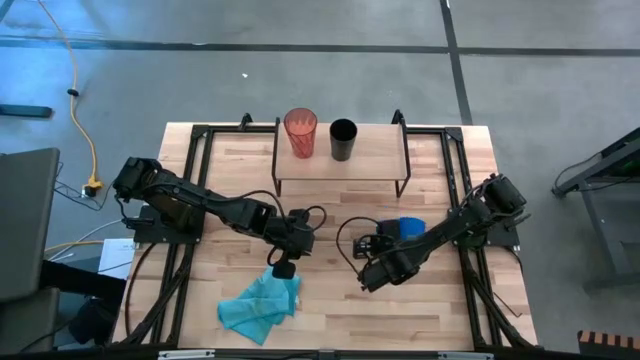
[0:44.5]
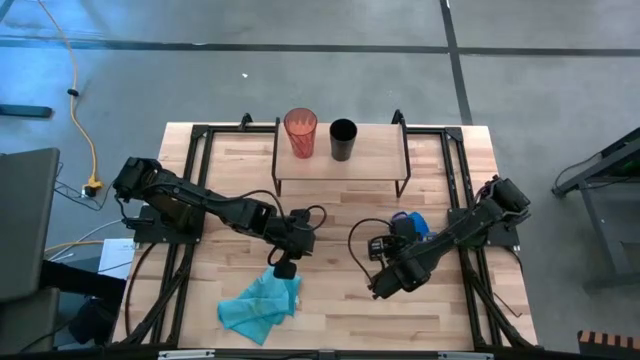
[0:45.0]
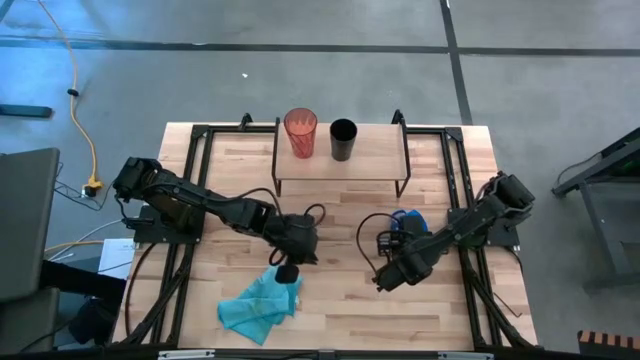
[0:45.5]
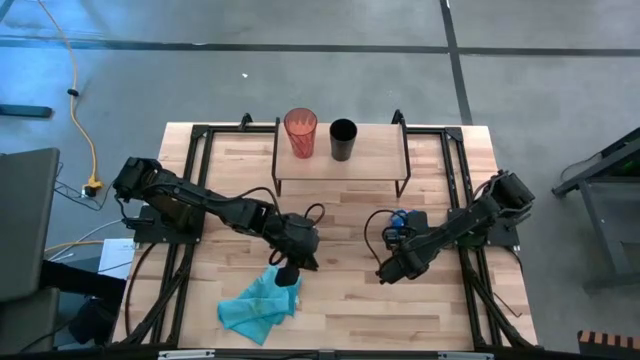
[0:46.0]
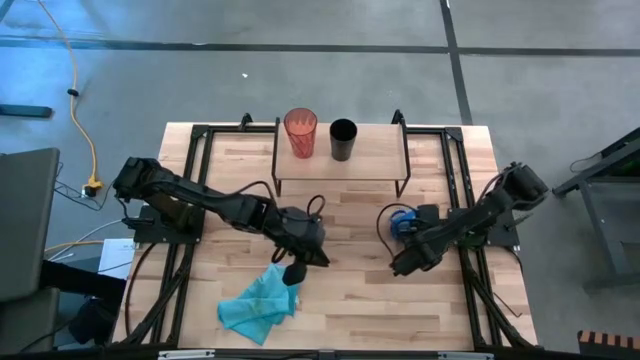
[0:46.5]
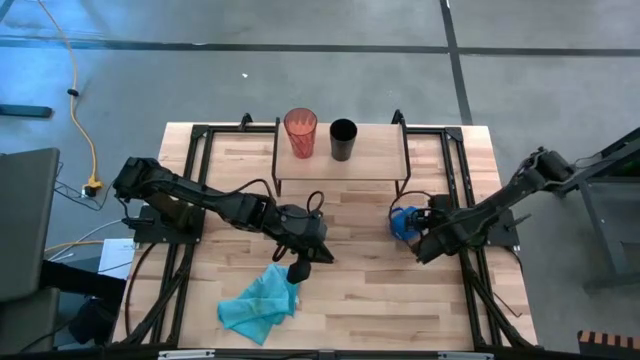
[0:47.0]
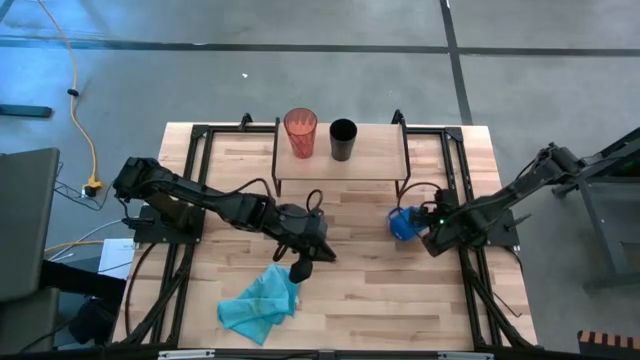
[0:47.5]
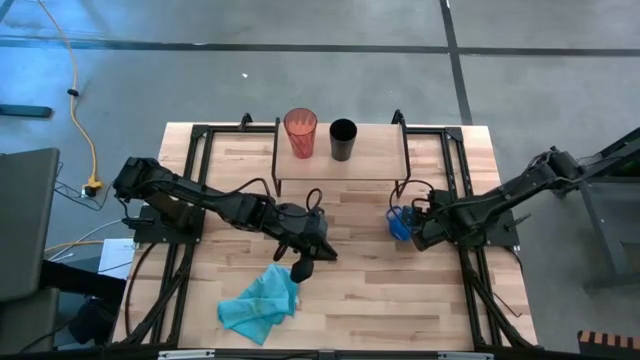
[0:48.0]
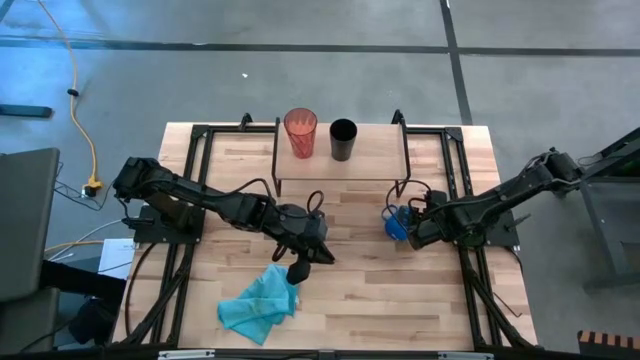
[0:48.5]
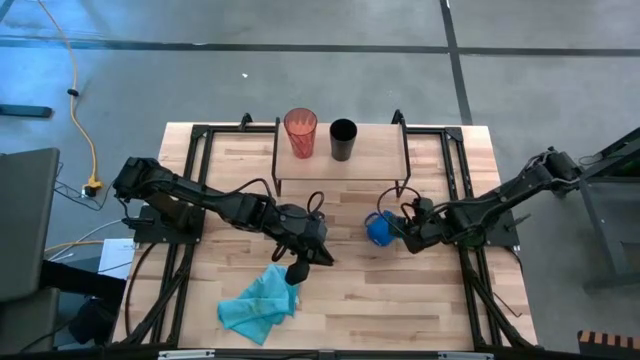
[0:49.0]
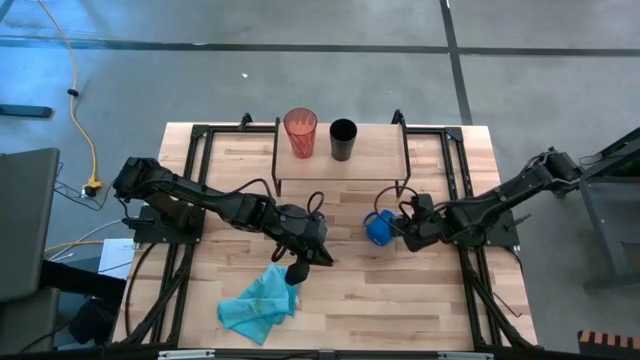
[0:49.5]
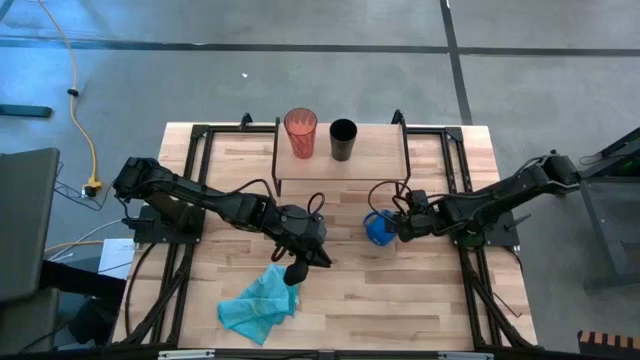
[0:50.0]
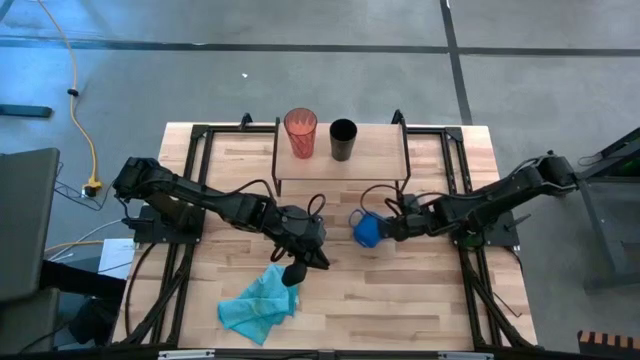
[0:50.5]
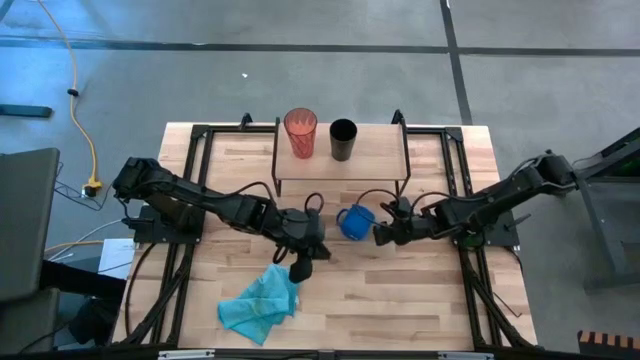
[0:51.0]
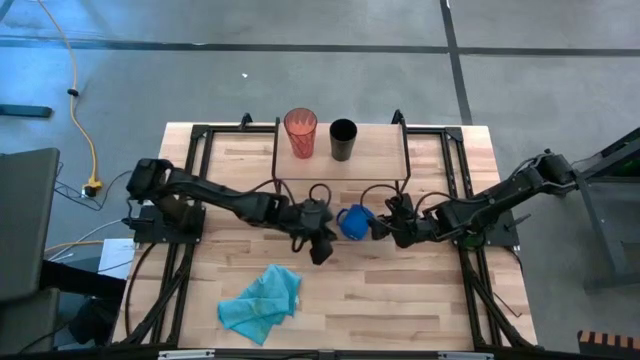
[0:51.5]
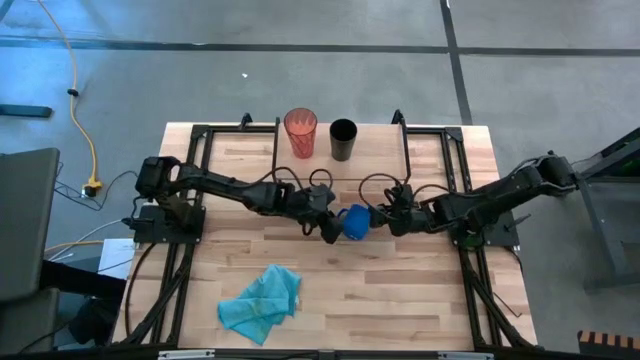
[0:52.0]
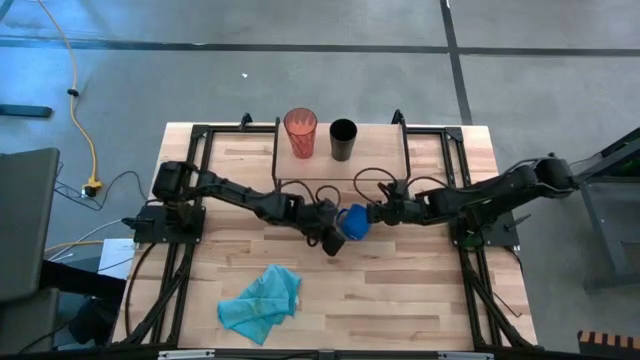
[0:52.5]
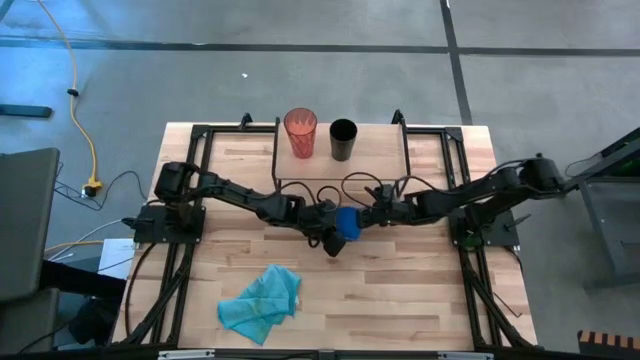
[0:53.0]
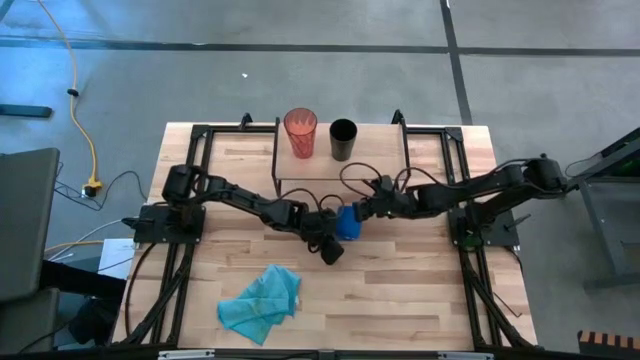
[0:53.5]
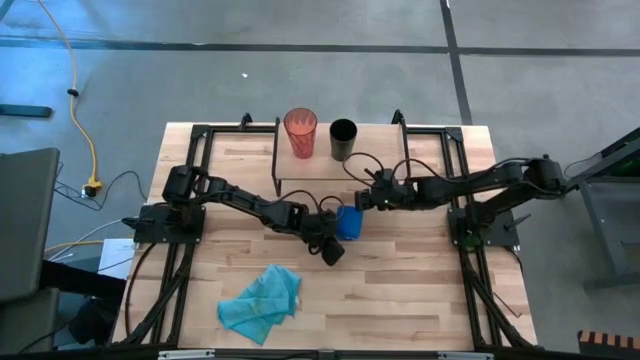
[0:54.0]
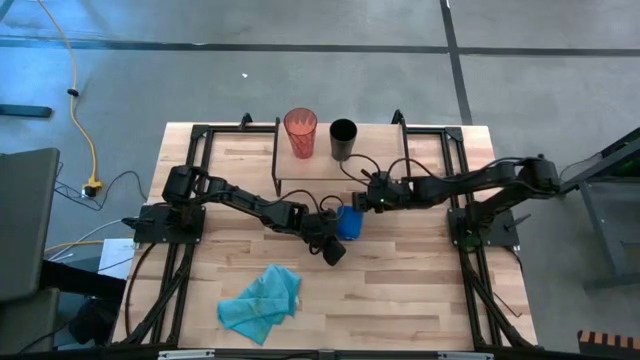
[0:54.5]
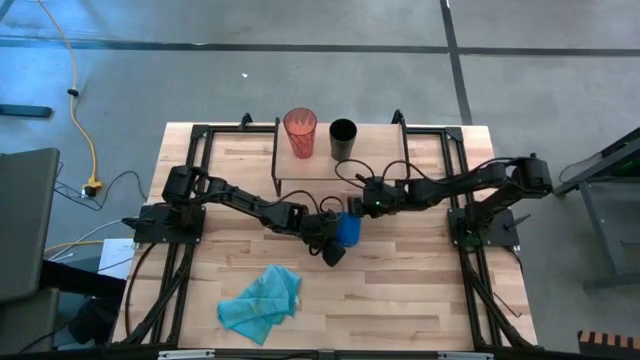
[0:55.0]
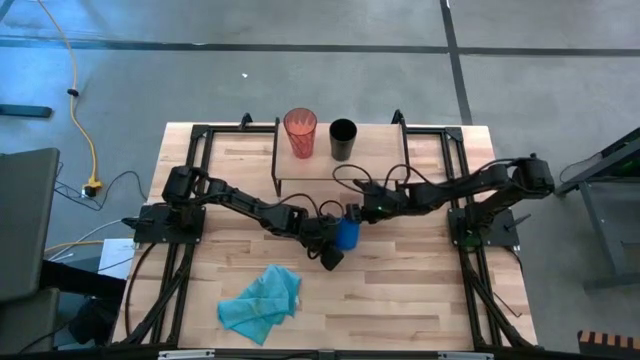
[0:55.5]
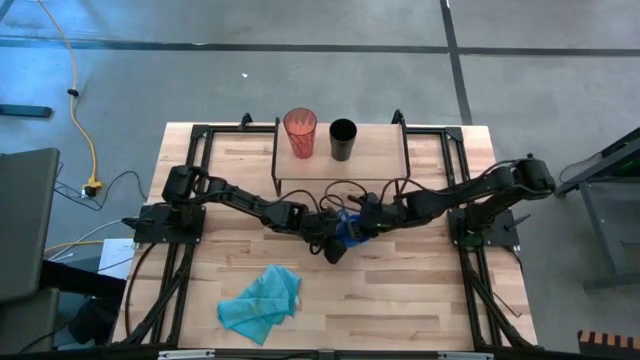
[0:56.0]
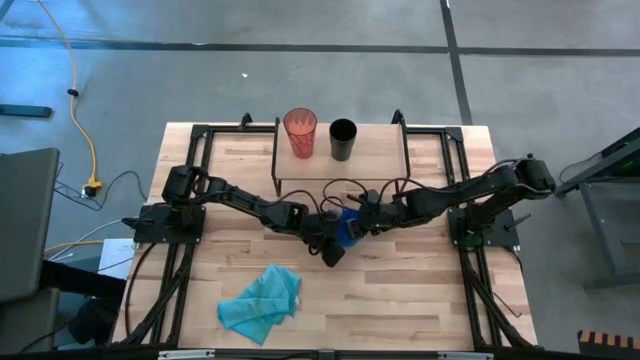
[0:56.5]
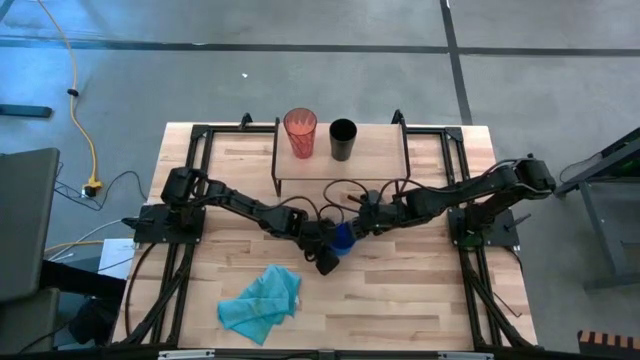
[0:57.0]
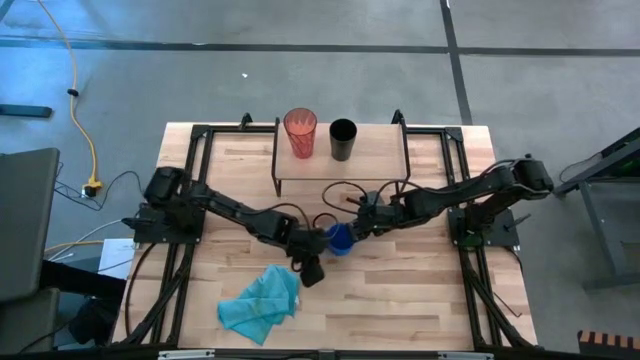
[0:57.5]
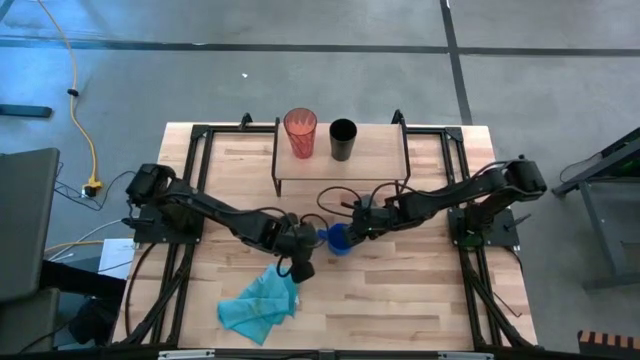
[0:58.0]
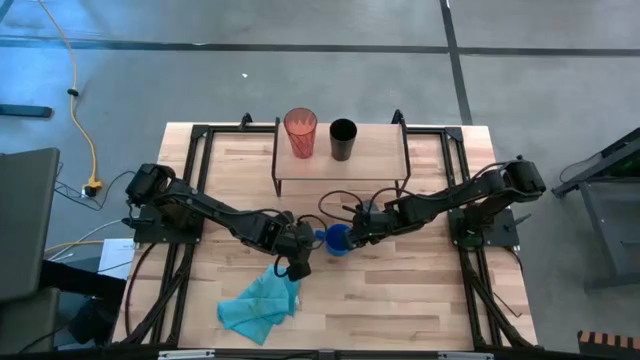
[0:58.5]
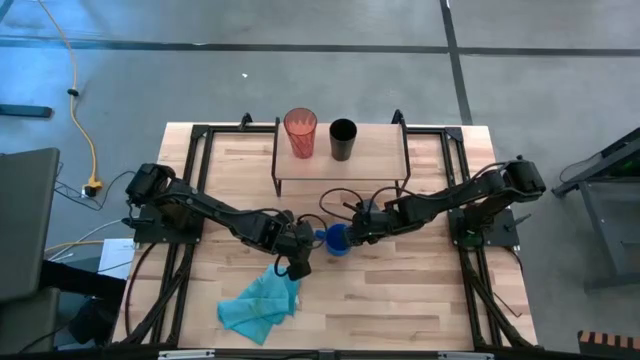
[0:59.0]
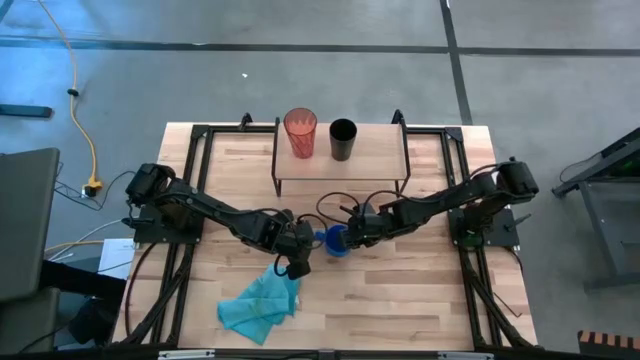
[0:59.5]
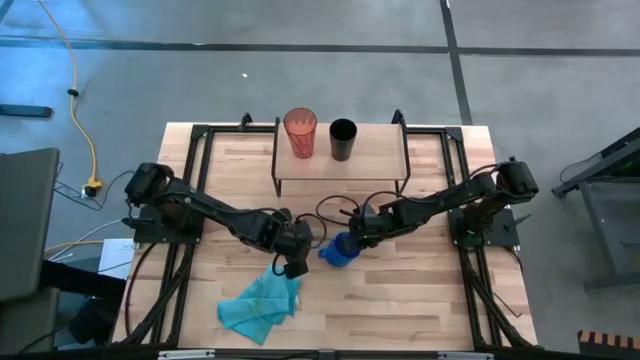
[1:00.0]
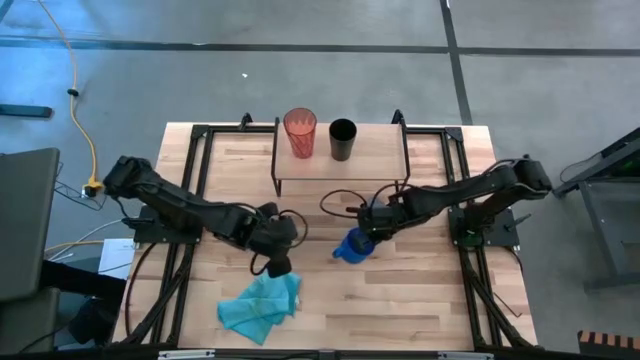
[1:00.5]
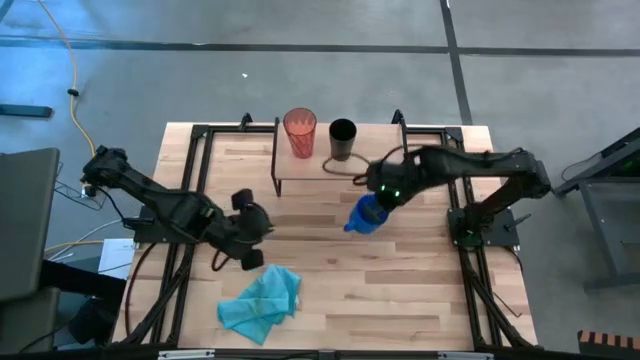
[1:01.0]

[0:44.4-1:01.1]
Task: Stack small to large cups/mugs on shelf
Put the blue mug on the shelf

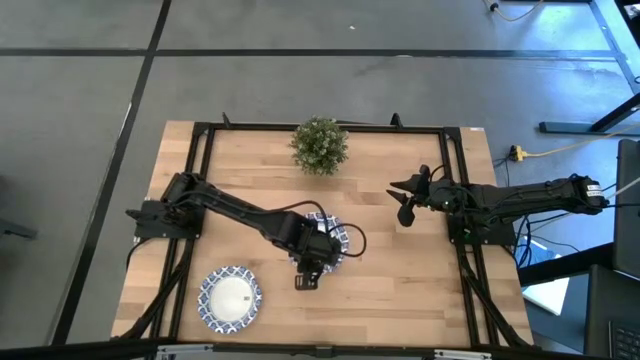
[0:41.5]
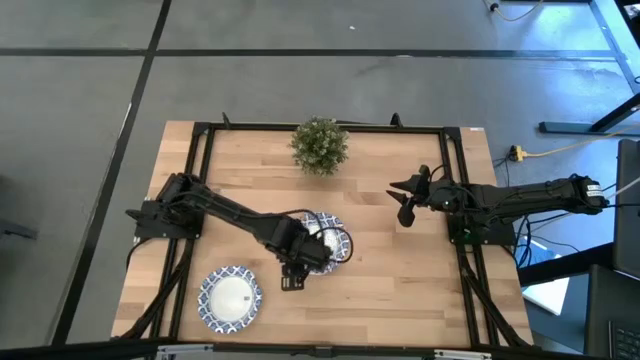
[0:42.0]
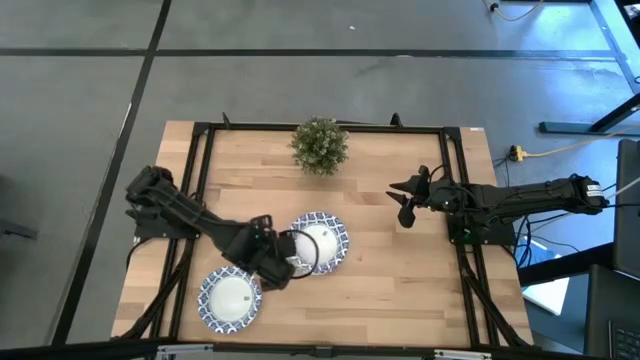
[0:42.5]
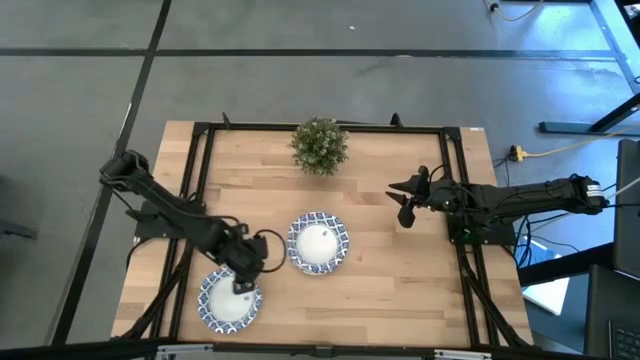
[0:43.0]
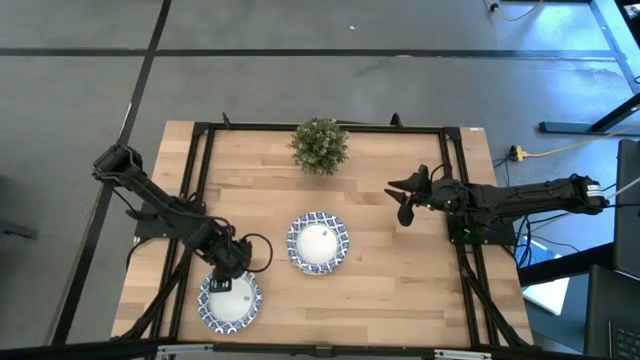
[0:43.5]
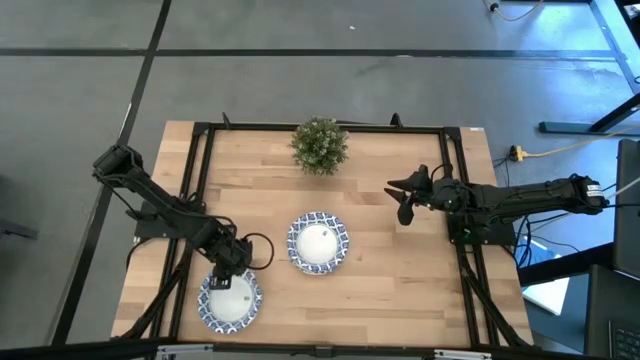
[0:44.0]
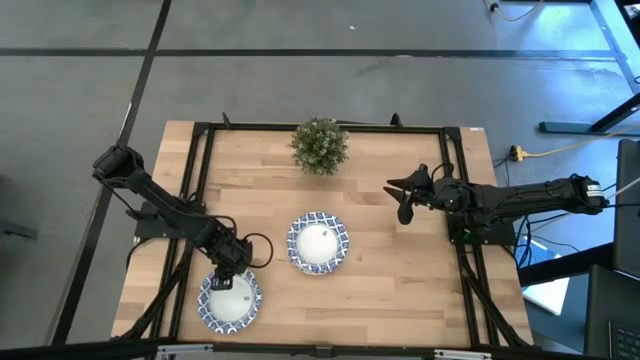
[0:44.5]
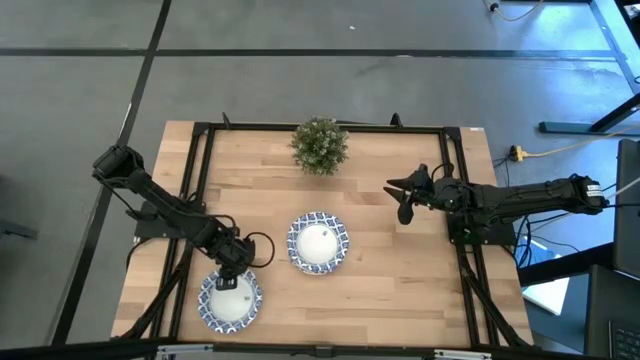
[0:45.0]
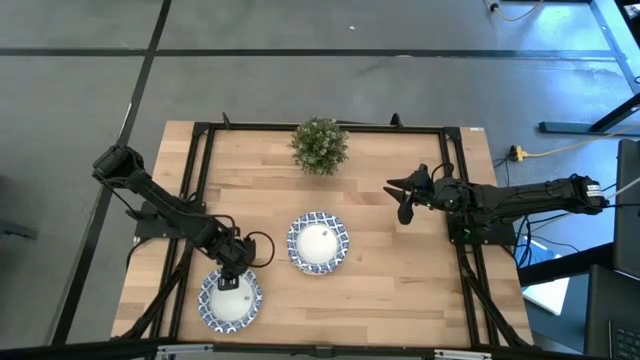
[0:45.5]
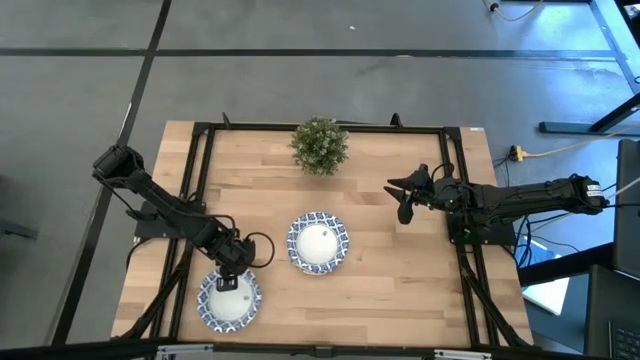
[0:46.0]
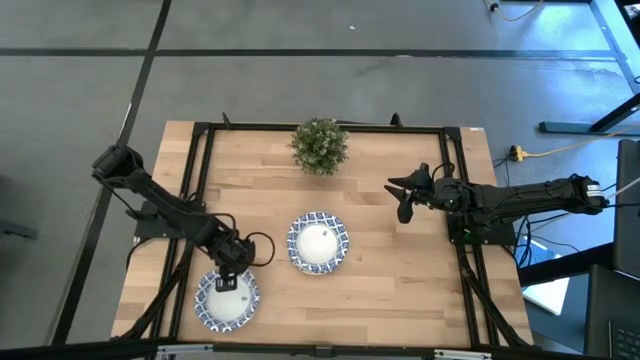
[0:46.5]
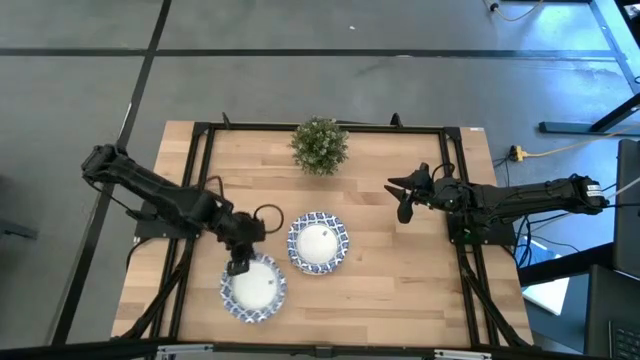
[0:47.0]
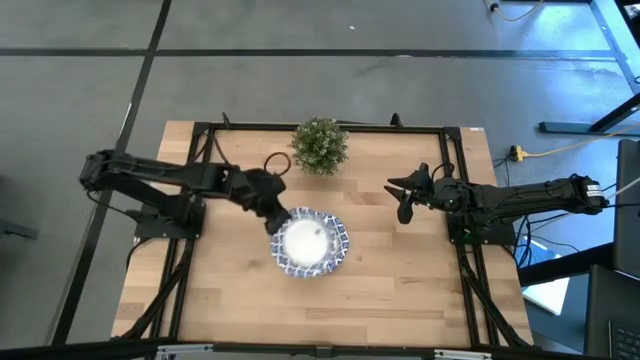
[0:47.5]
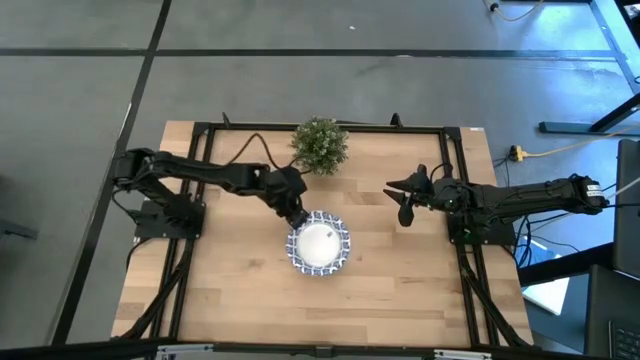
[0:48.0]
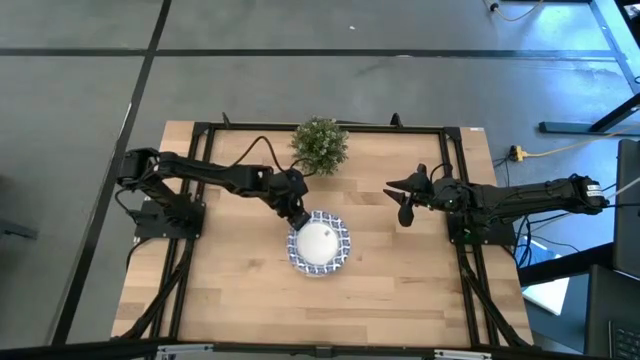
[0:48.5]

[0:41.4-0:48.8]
Task: Nest bowls inside each other
Stack the blue pattern bowl on the blue pattern bowl
